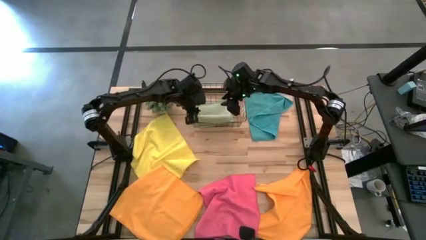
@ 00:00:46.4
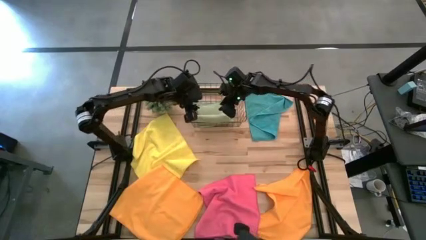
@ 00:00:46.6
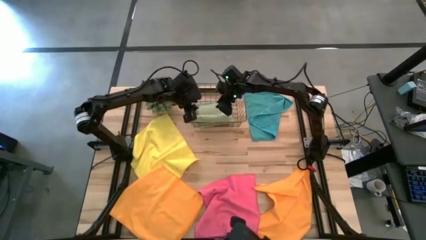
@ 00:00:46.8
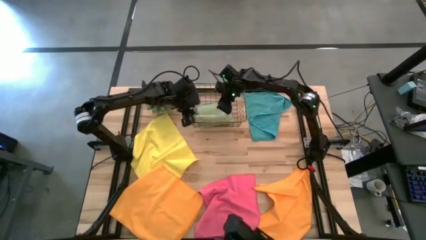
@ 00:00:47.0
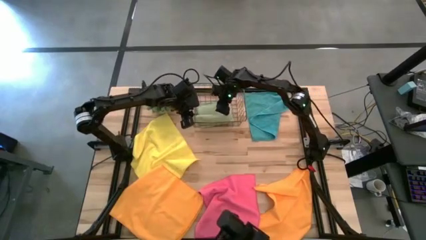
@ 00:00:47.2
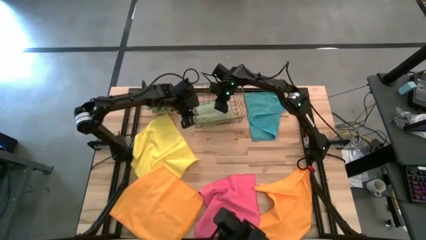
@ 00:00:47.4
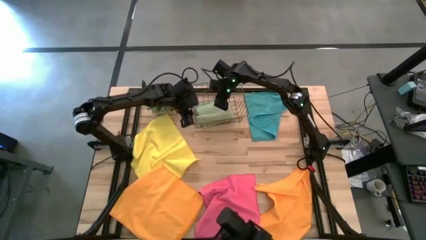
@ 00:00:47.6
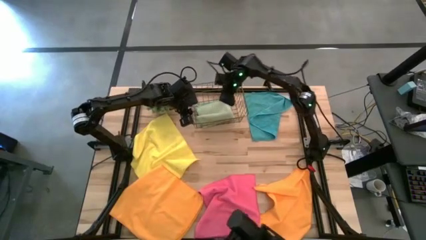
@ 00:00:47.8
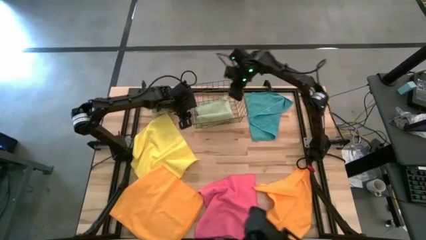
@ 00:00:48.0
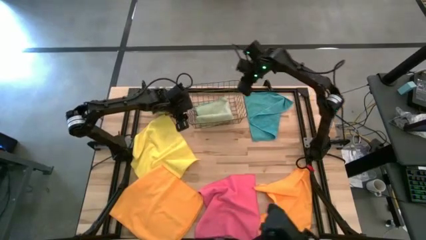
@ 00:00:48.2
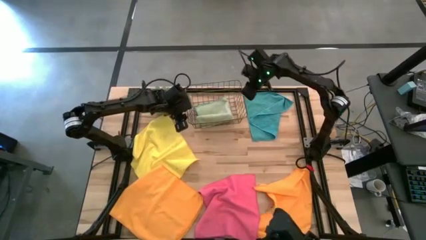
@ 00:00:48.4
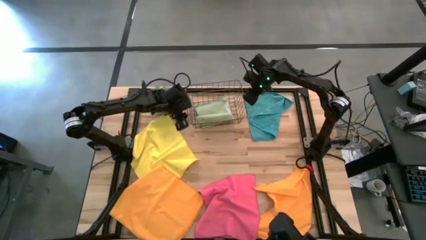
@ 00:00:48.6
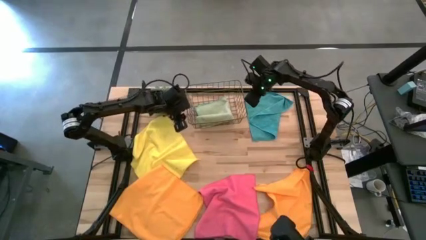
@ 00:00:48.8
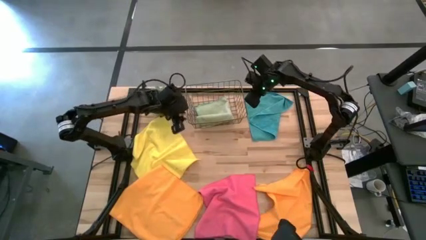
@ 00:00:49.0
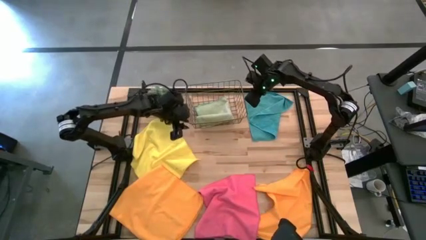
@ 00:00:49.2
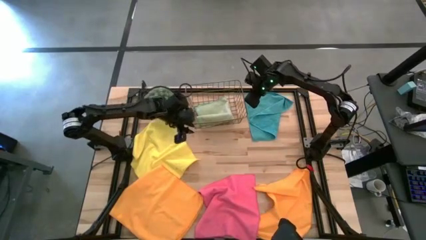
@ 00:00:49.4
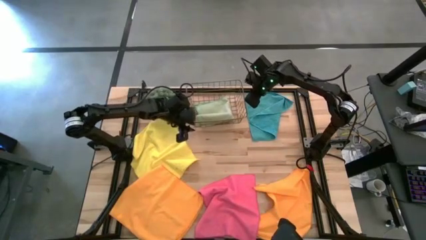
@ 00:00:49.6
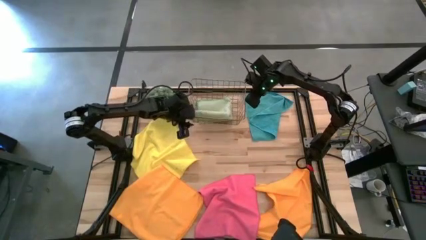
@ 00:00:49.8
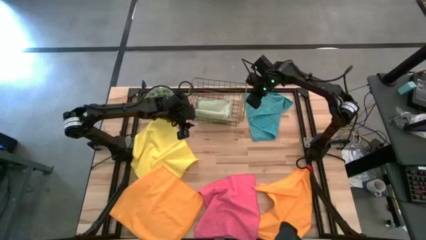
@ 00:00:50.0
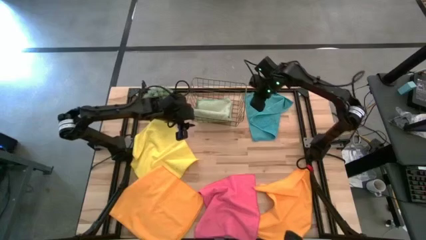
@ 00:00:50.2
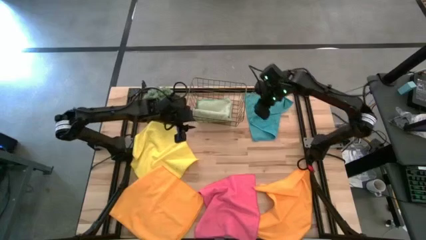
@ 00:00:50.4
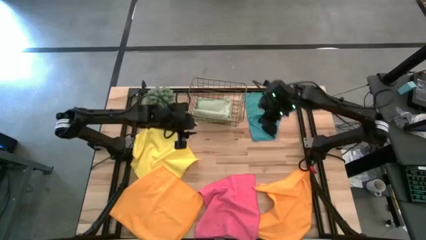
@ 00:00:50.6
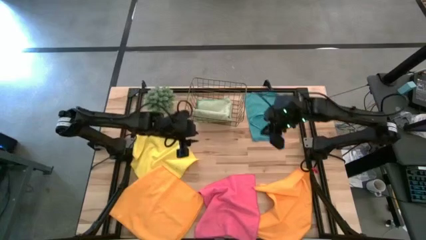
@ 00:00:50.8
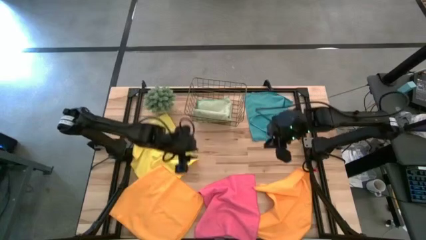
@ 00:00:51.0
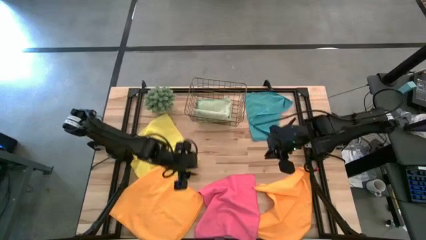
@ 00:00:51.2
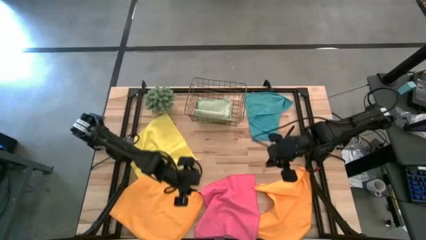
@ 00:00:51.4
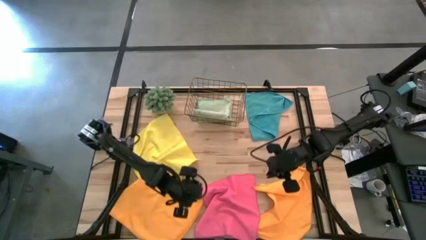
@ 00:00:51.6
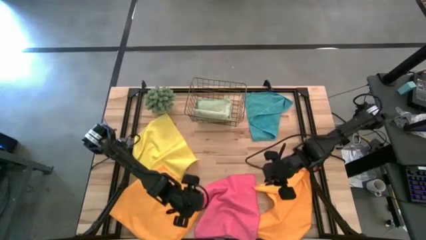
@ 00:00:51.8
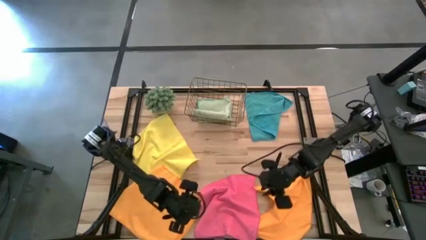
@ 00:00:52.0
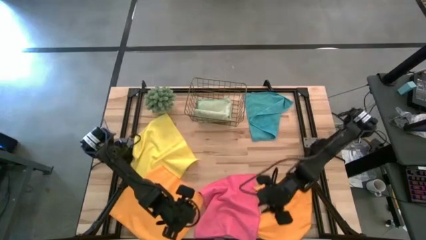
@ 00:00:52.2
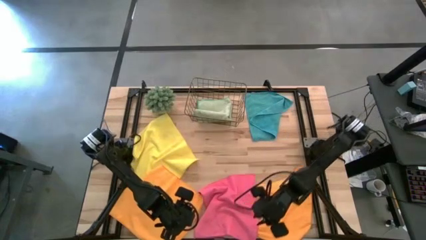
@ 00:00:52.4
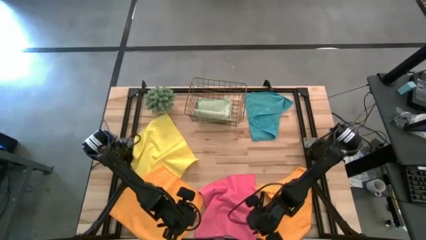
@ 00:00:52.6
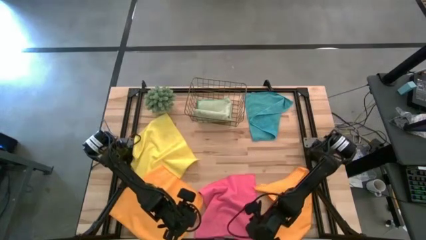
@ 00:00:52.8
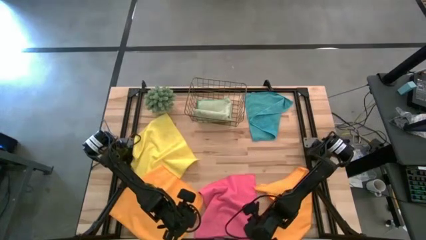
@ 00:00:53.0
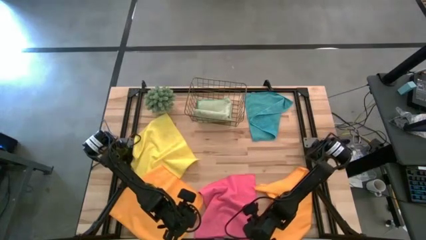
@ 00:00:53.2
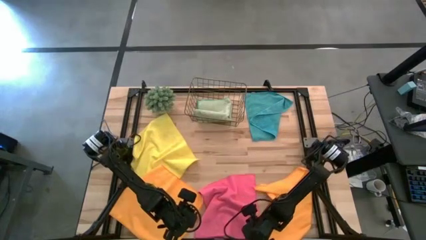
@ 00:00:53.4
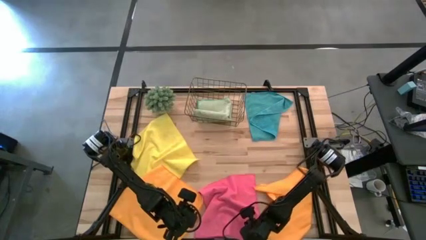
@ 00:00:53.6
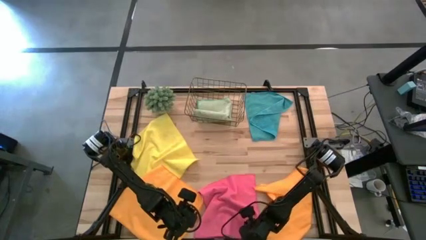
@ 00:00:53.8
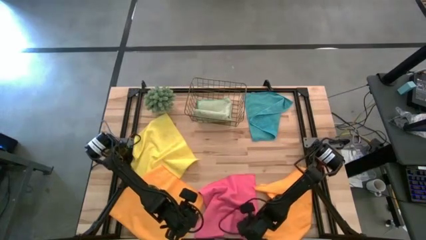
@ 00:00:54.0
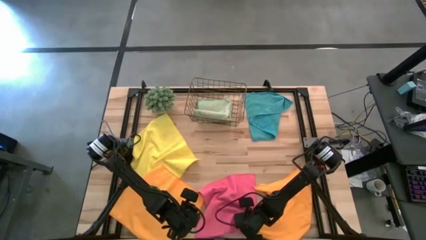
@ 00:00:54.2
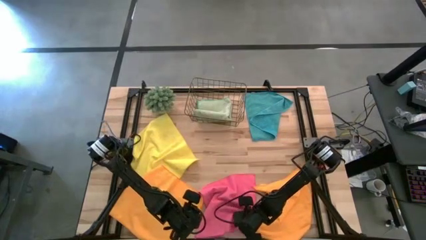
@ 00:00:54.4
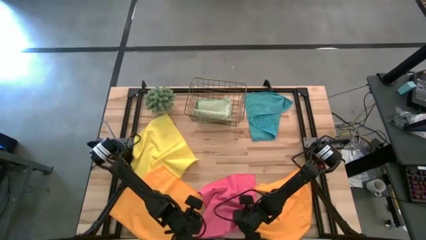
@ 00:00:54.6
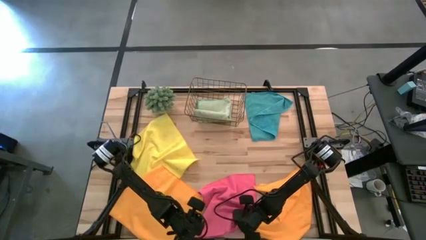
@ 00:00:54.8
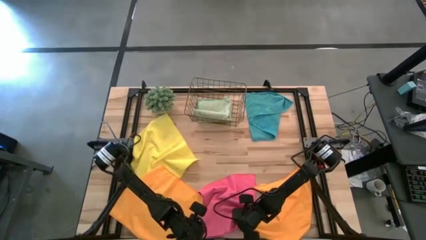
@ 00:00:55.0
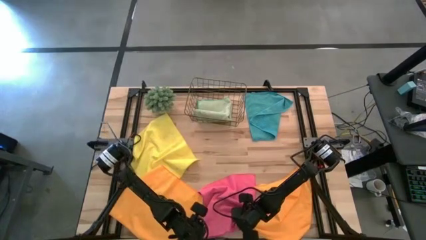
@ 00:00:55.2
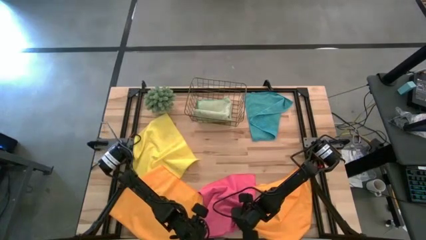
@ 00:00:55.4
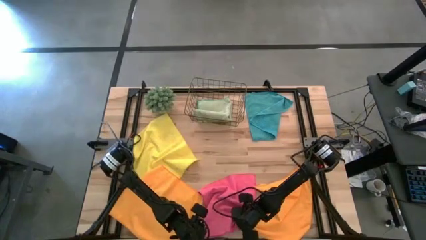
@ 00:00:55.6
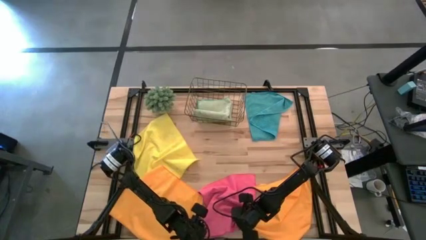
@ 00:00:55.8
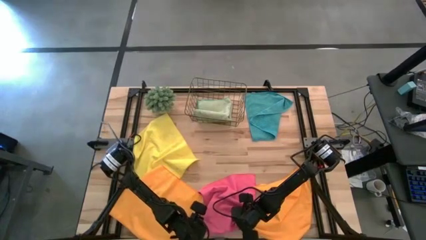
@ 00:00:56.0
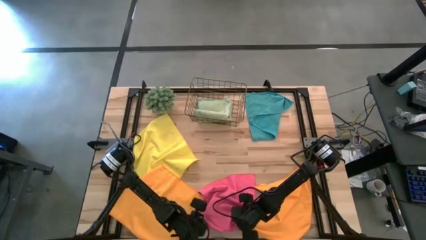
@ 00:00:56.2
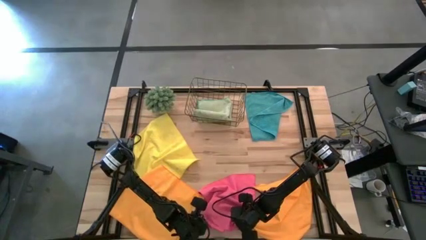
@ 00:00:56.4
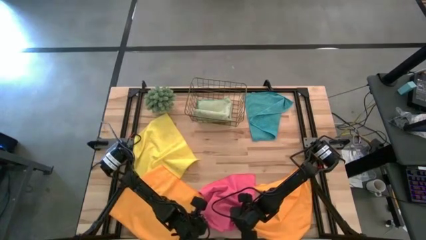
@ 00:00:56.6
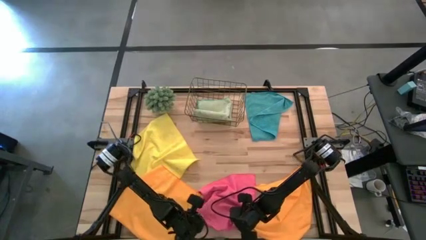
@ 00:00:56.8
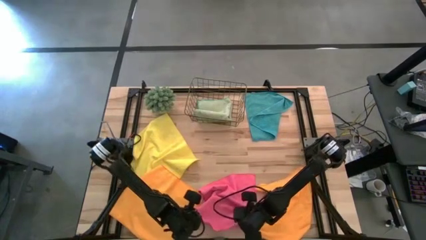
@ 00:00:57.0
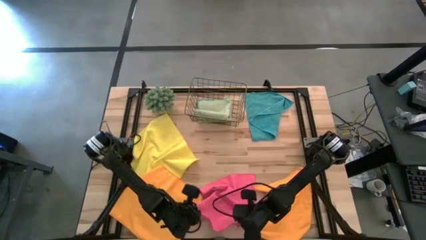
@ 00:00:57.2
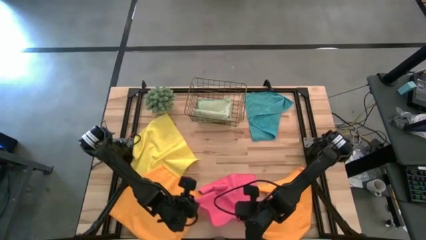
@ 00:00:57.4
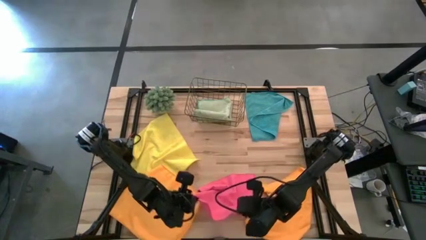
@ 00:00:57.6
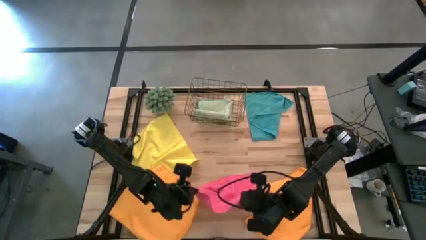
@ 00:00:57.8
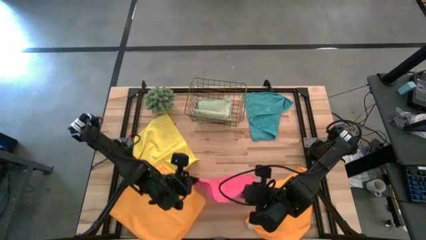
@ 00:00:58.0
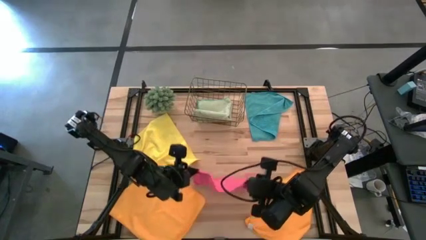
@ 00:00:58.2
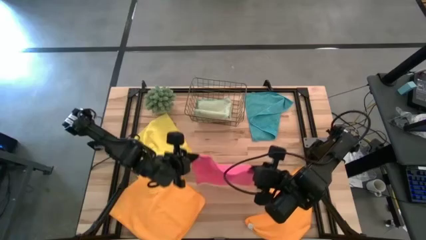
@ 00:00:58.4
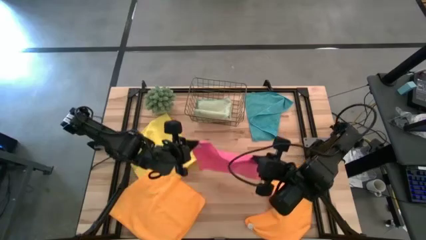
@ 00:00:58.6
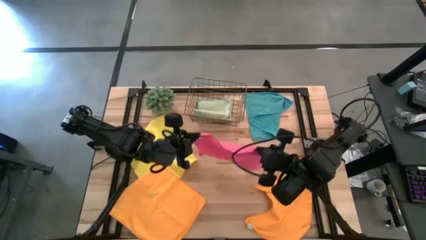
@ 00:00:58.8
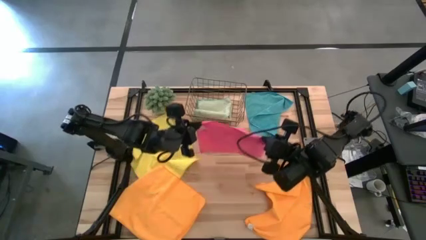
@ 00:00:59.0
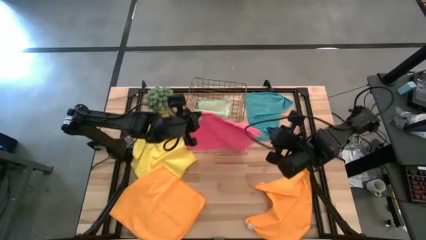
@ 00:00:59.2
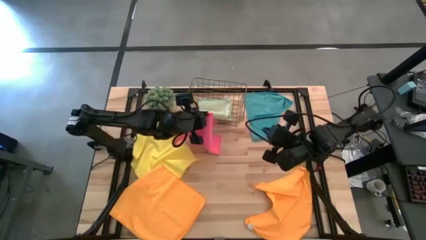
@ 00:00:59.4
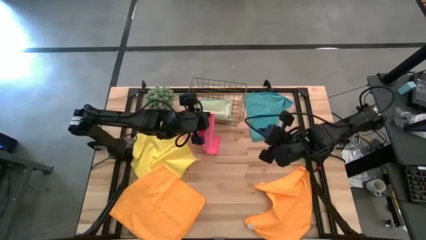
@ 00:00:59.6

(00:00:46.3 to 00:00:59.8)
Task: Fold microfiber towels
Fold the pink towel
